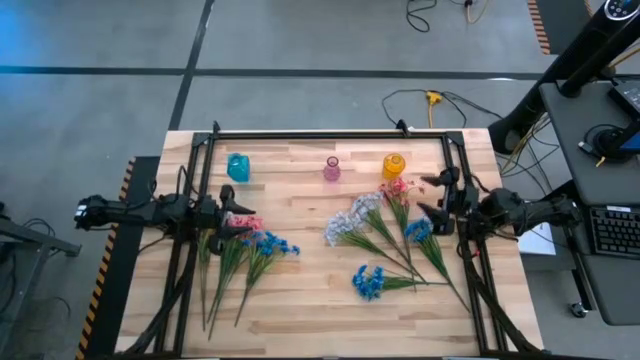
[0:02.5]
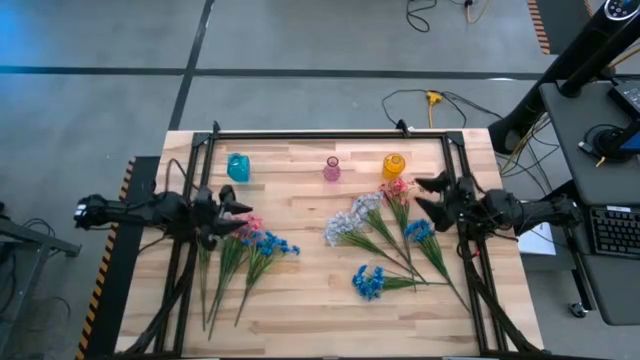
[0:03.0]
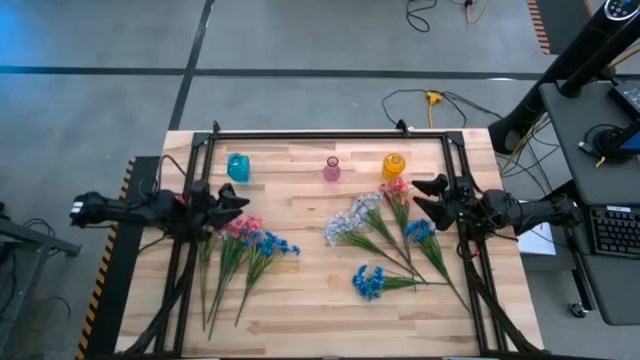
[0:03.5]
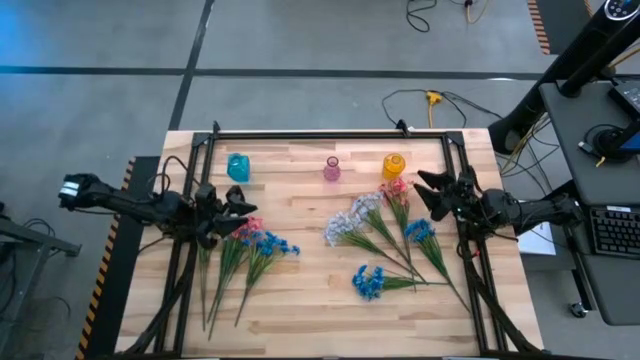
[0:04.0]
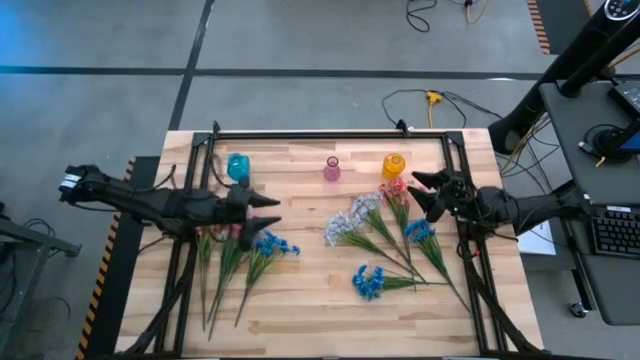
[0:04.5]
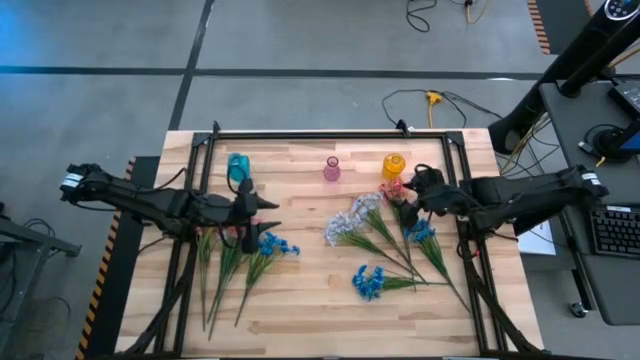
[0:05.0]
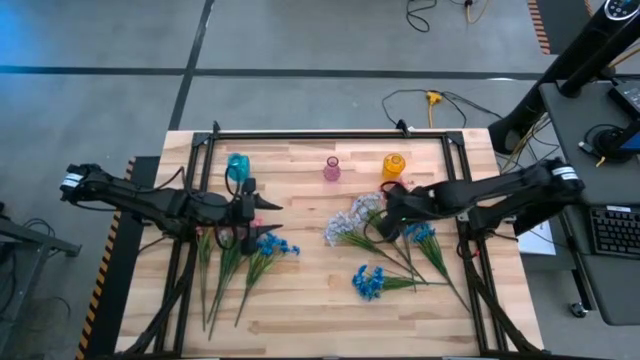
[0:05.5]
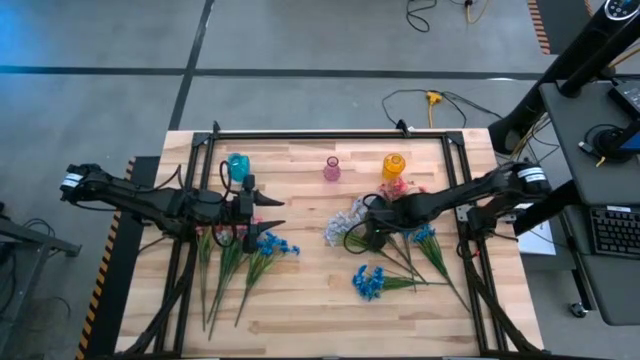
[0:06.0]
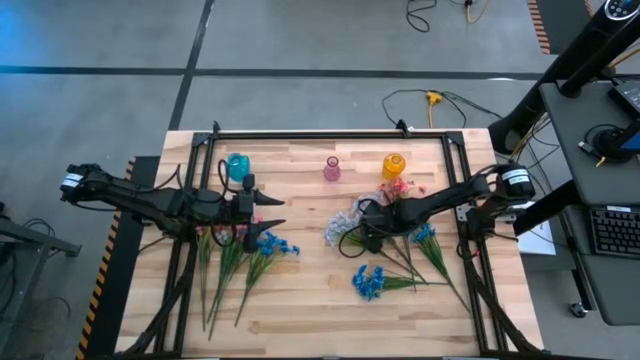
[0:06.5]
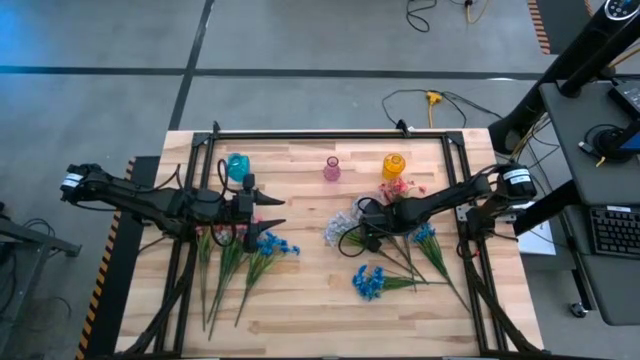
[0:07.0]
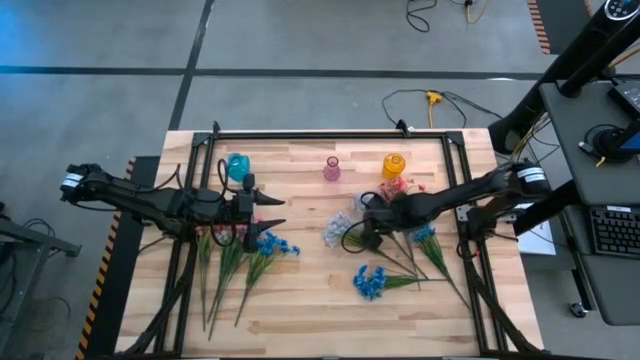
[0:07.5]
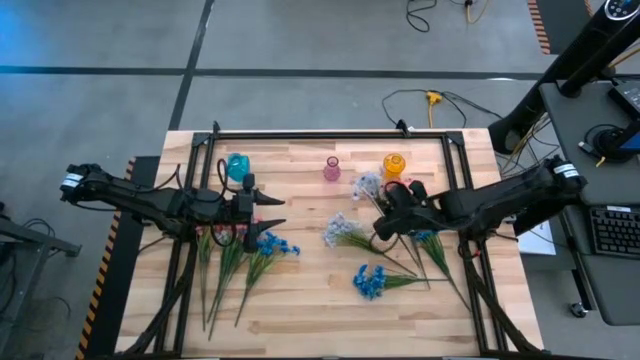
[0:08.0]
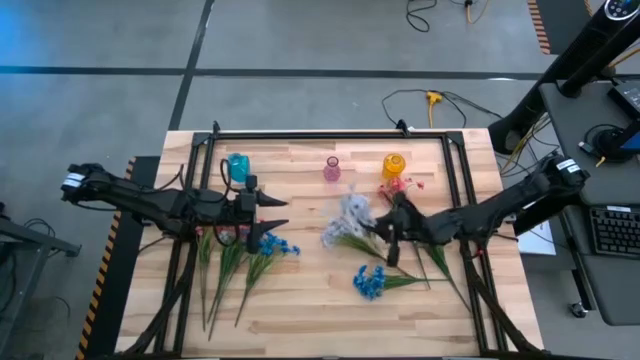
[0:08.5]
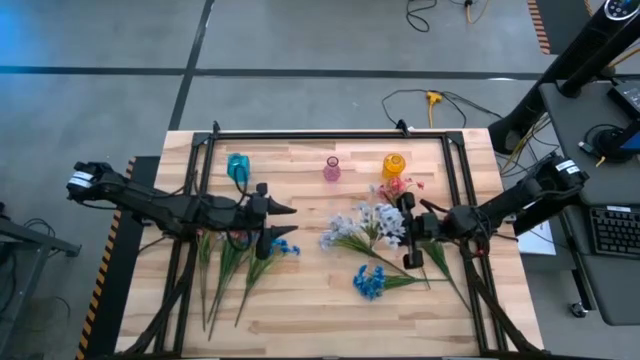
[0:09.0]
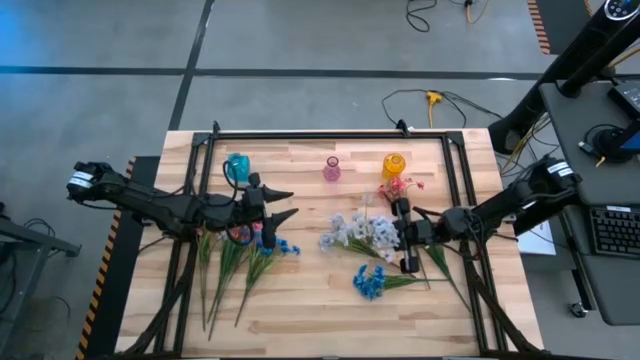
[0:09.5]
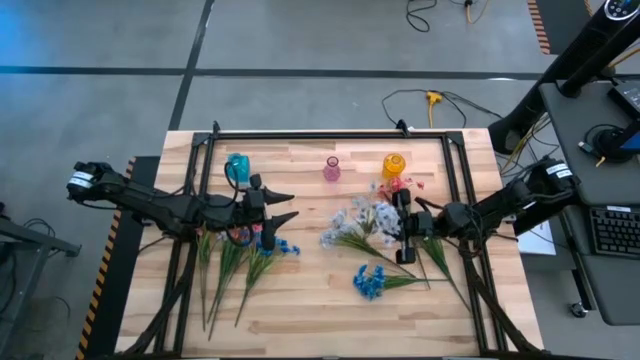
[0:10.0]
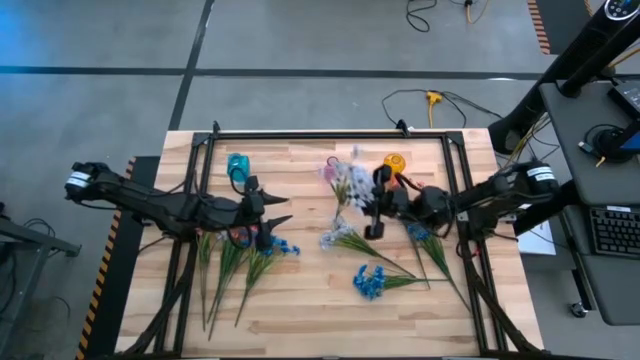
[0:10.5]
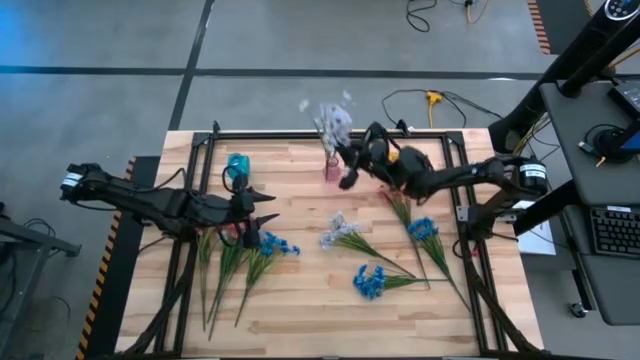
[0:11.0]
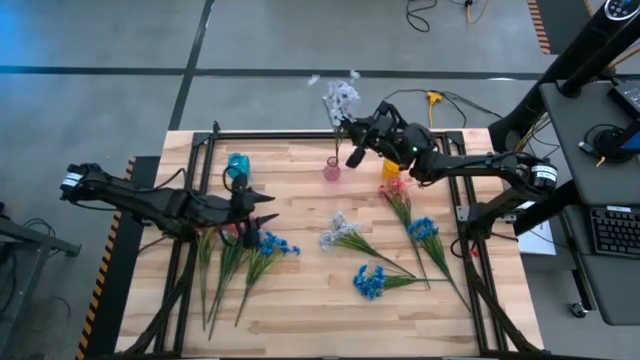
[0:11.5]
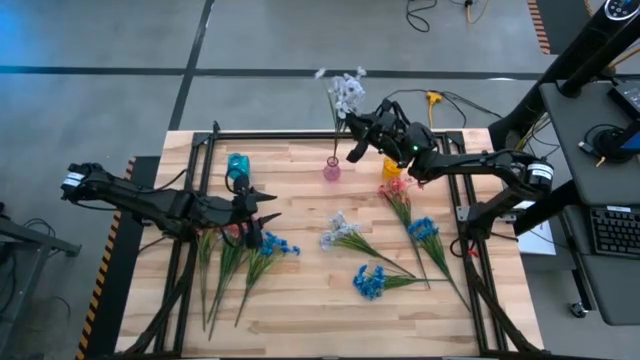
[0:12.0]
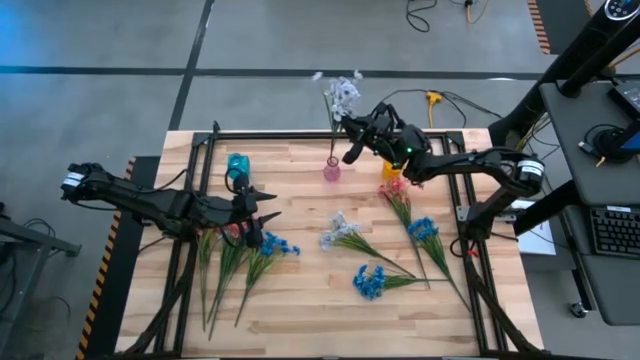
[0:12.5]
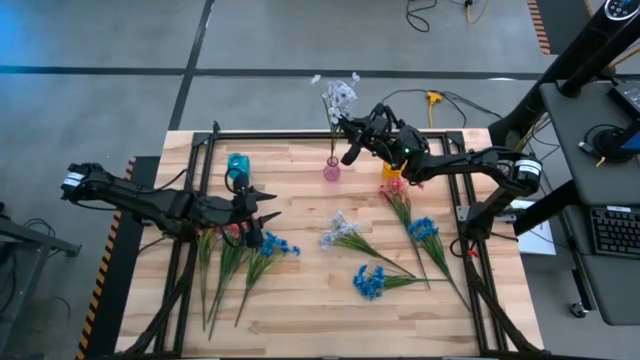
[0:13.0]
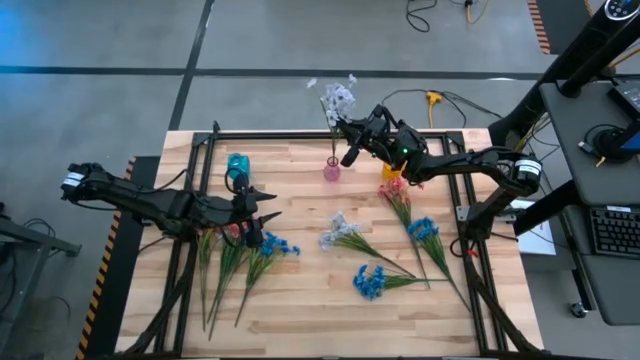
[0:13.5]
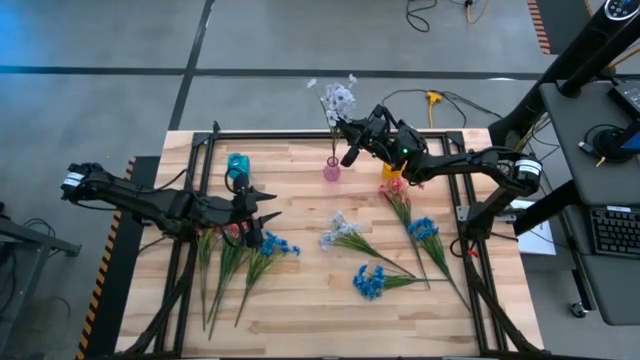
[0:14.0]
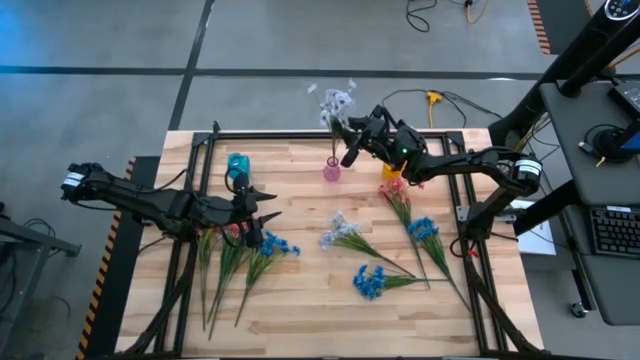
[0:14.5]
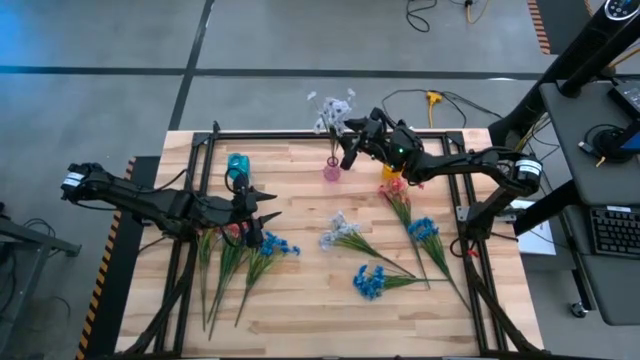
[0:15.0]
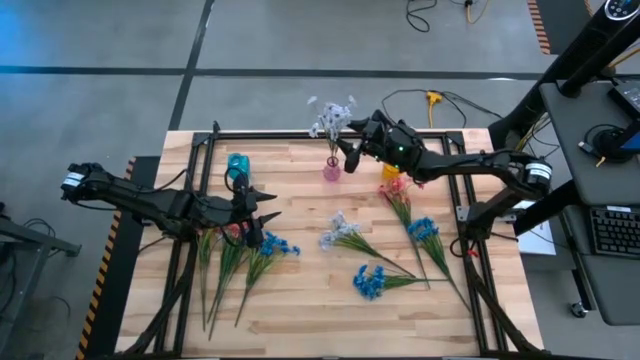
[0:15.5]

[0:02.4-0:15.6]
Task: Sort flowers into vase by color
Put the white flowers into the pink vase
